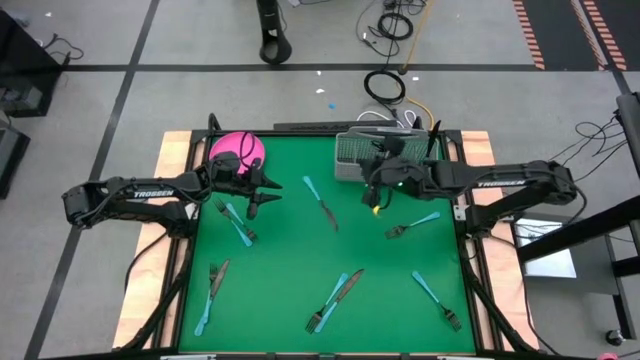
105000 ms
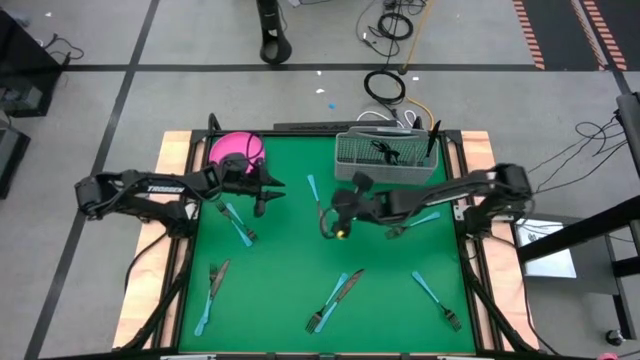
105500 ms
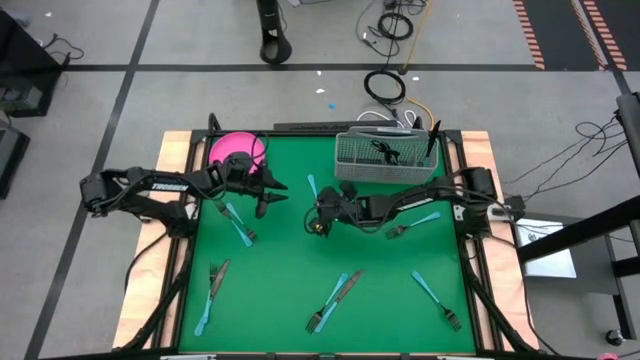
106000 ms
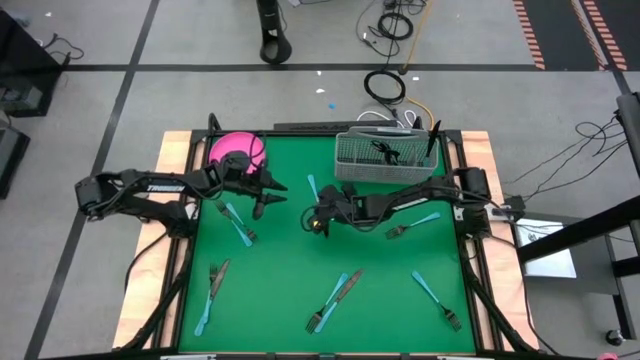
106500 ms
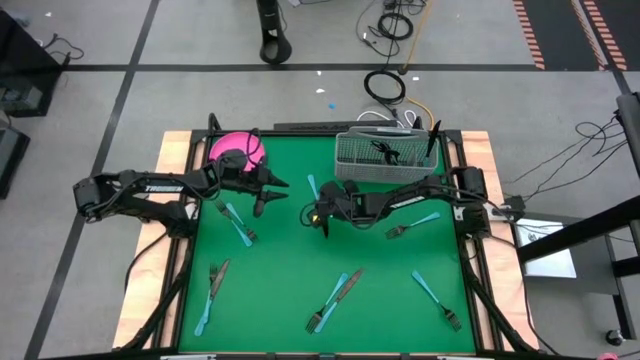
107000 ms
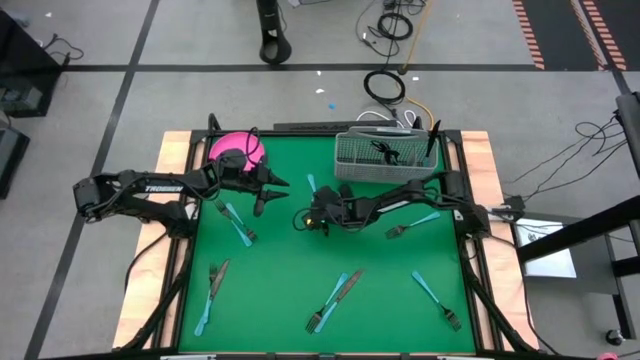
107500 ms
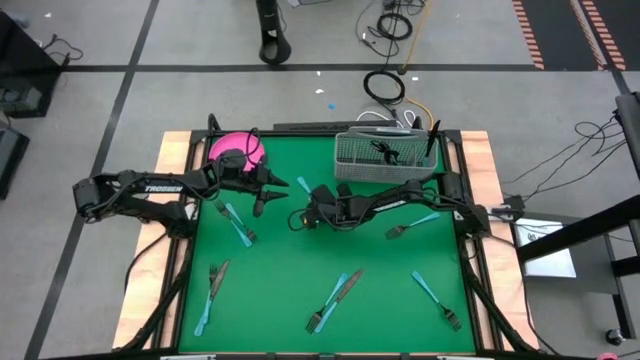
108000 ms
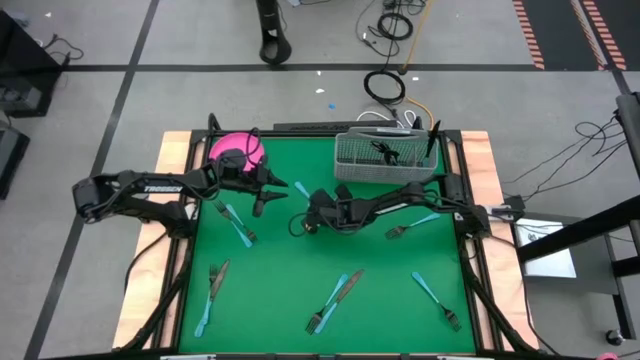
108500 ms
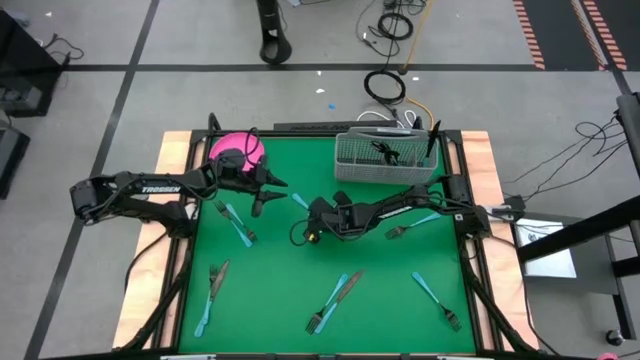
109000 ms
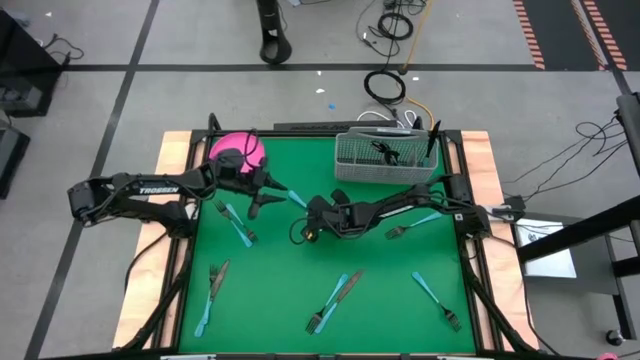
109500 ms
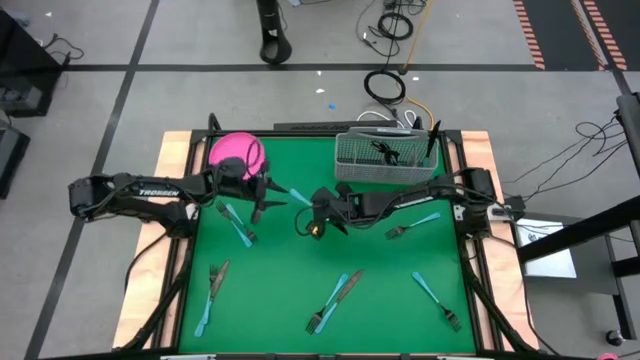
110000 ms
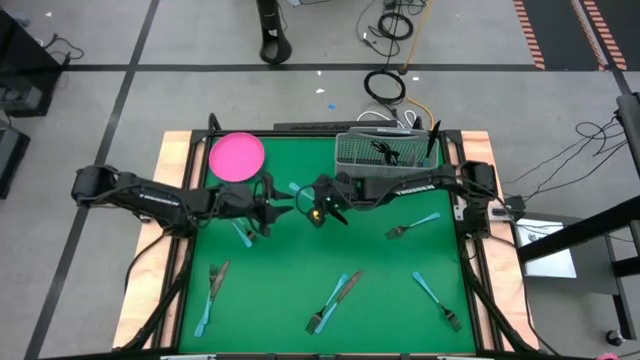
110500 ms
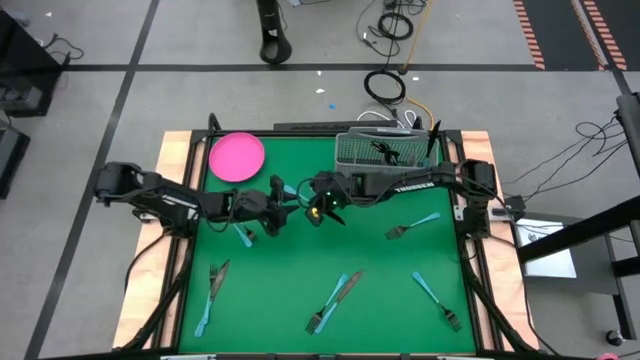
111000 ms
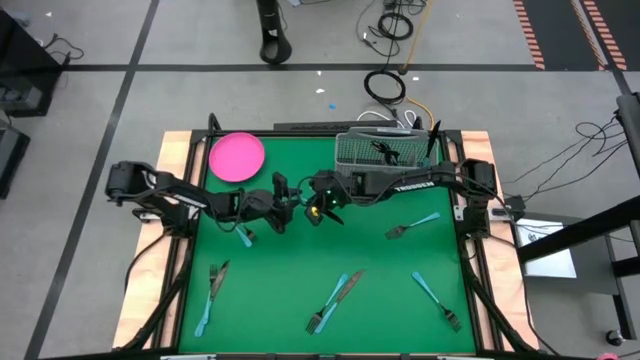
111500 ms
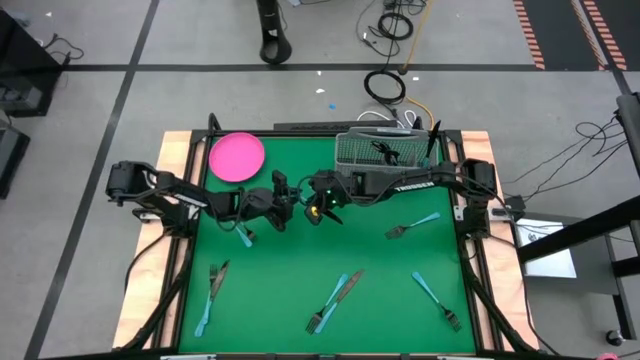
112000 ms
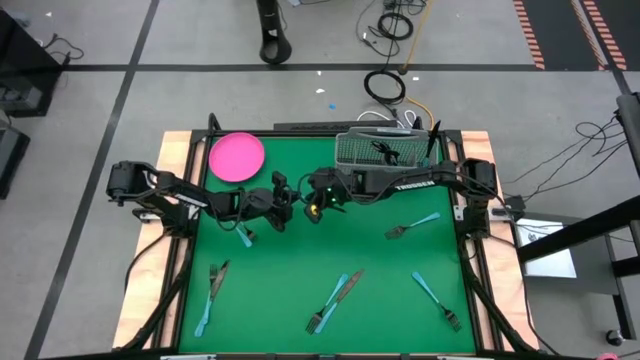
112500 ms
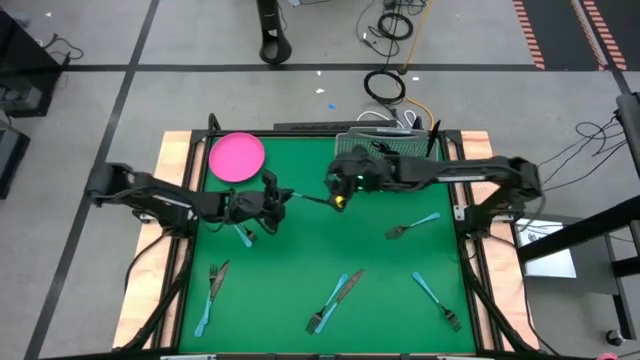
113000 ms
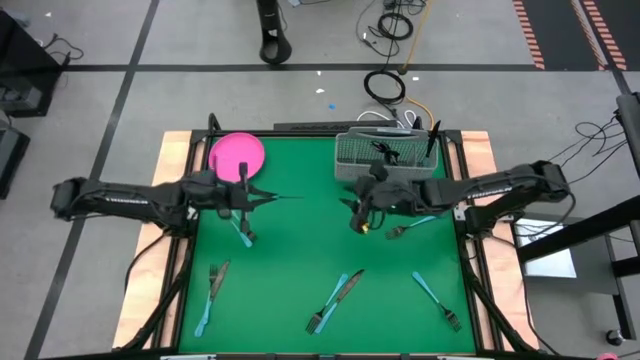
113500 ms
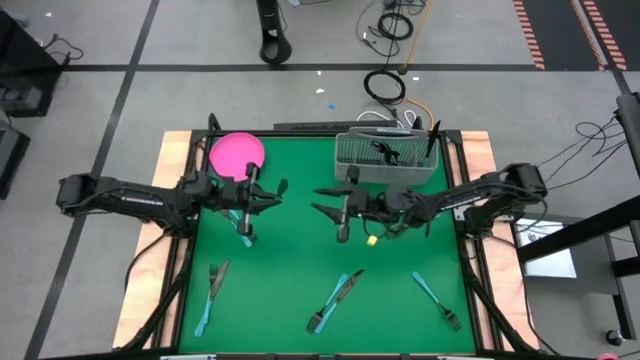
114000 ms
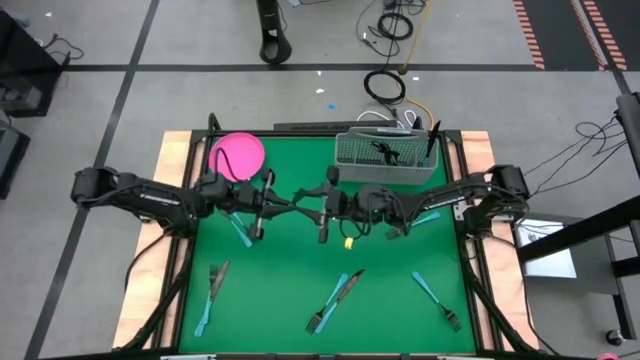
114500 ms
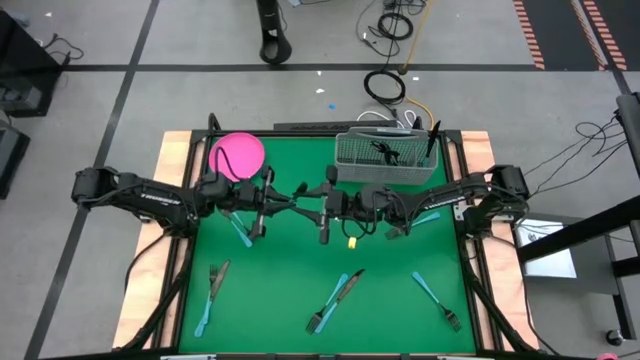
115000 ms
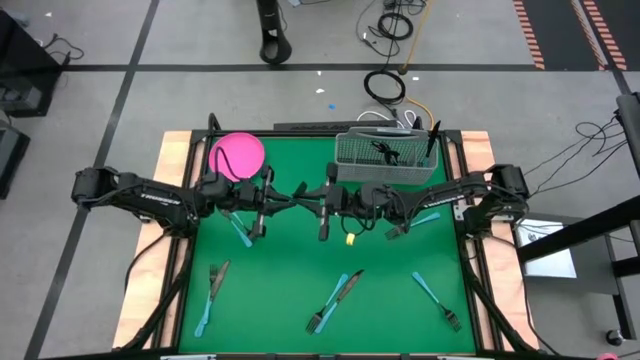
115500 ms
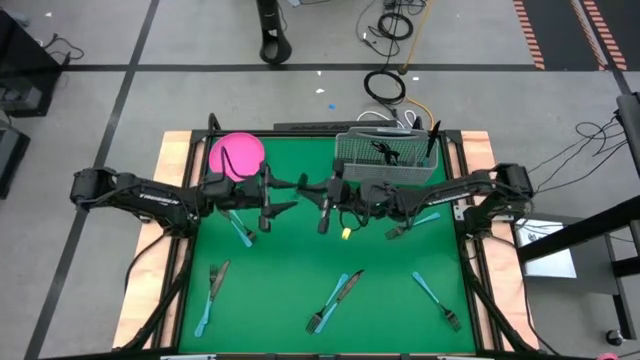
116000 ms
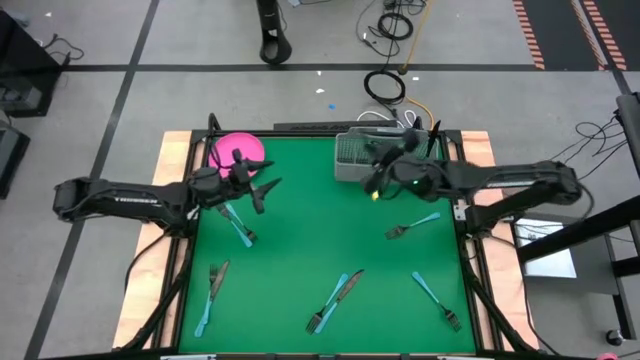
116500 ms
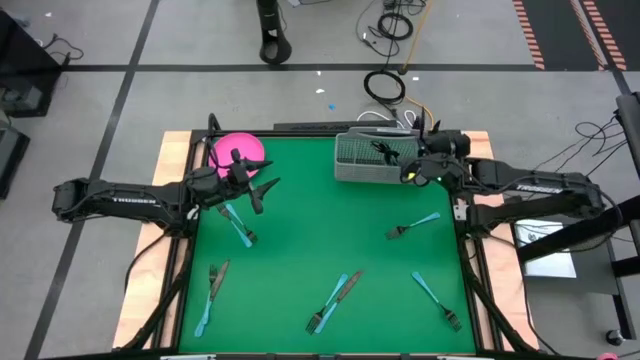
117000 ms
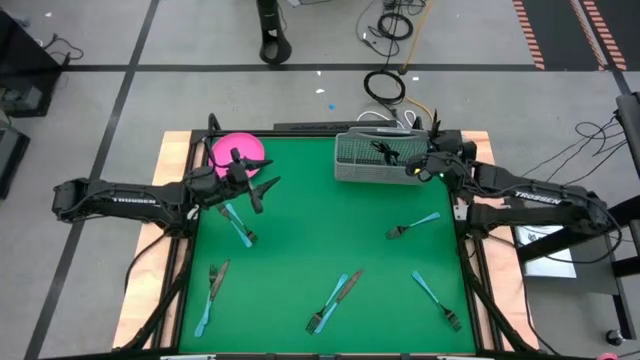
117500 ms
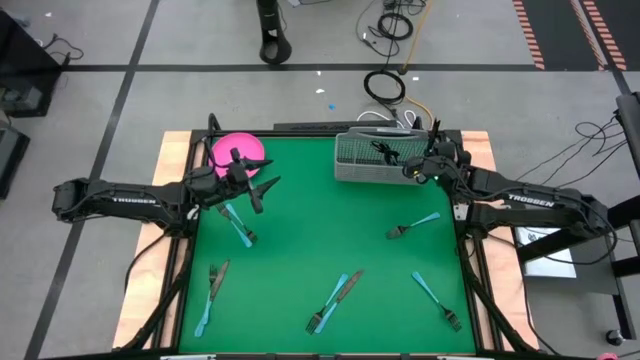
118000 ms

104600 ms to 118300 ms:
Task: Sort silverware
Put the top black knife into the cutlery rack with the other black knives

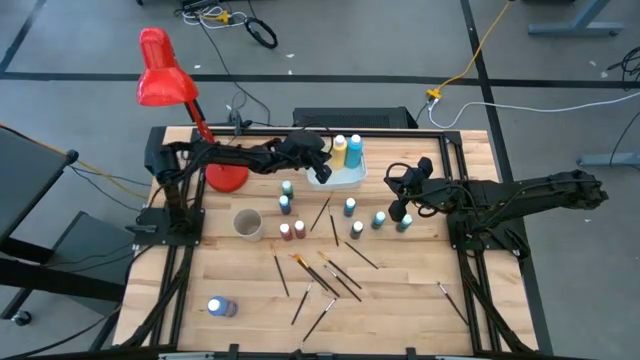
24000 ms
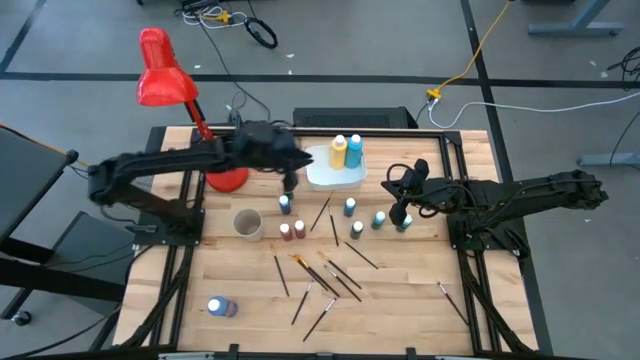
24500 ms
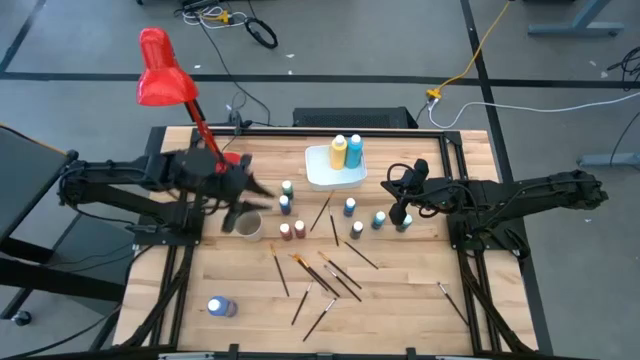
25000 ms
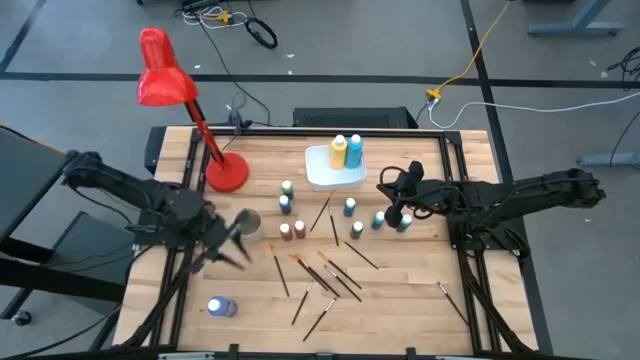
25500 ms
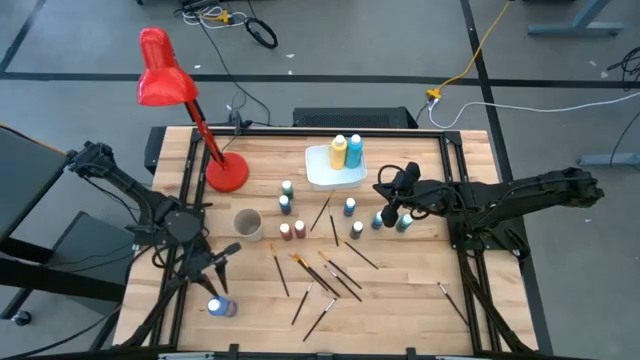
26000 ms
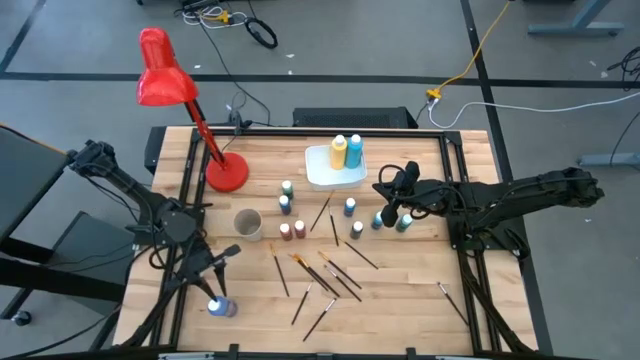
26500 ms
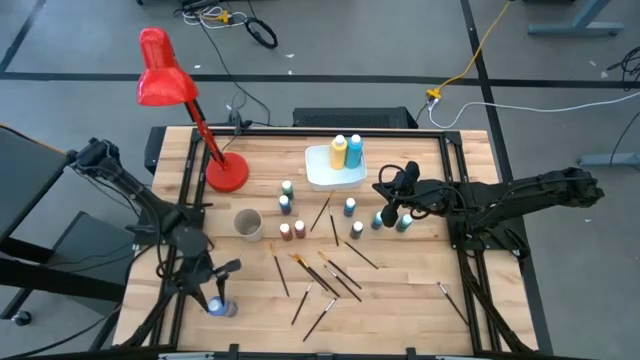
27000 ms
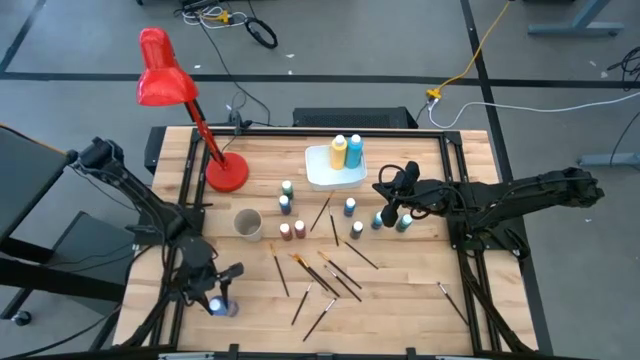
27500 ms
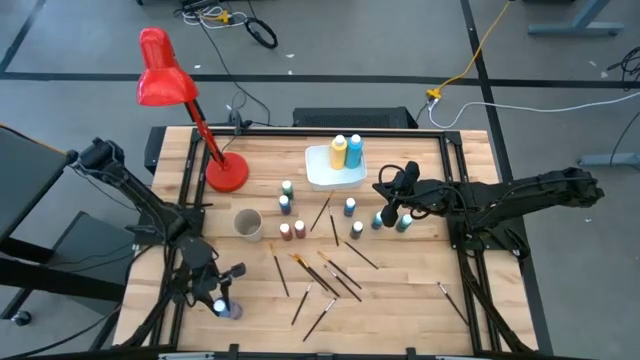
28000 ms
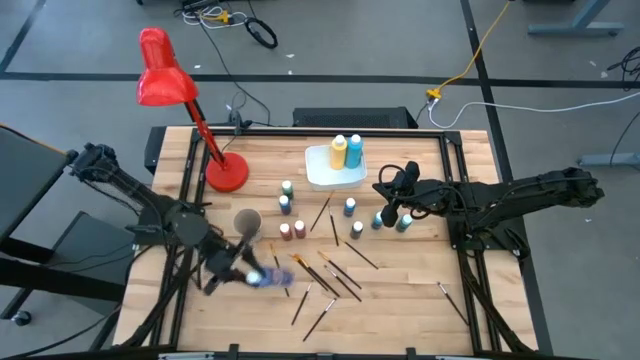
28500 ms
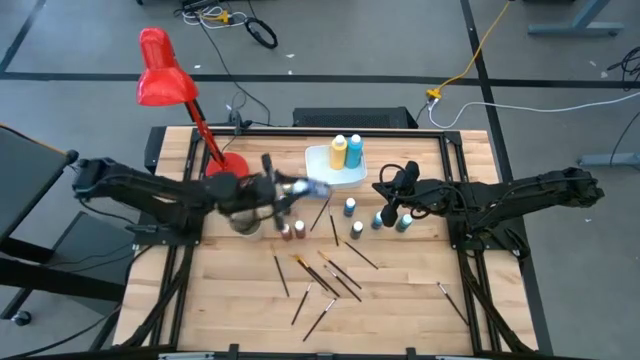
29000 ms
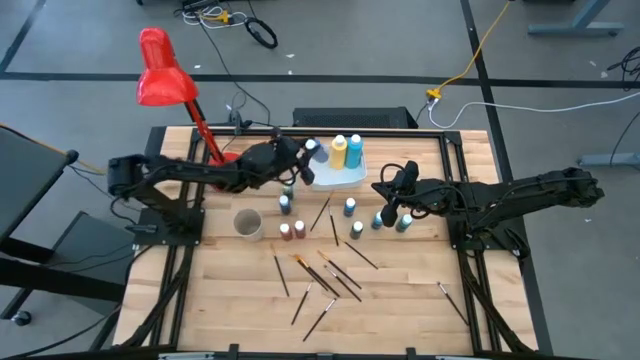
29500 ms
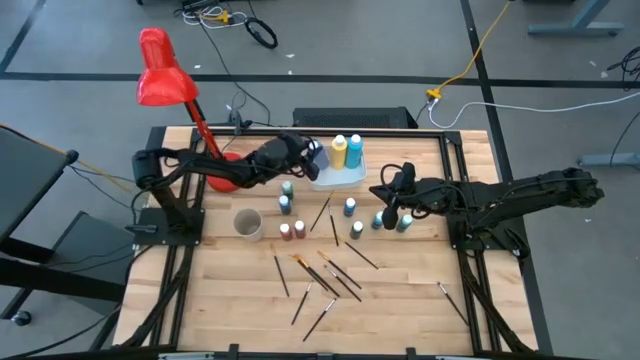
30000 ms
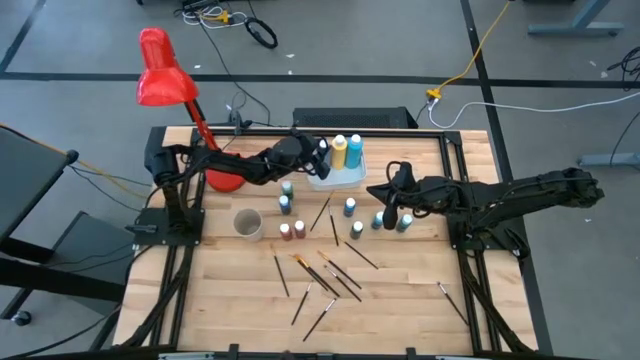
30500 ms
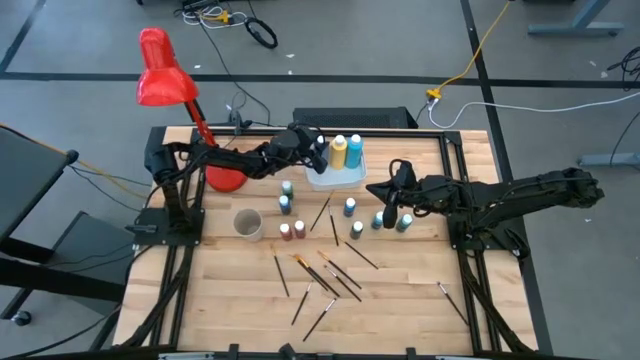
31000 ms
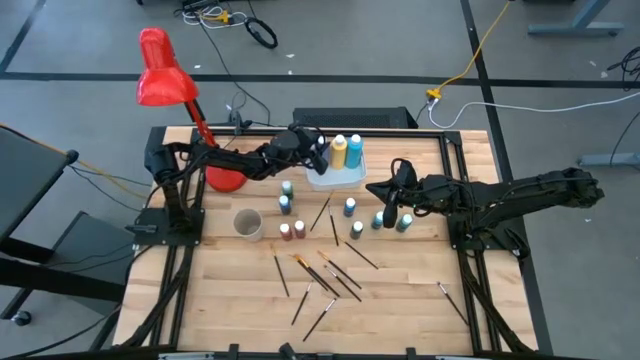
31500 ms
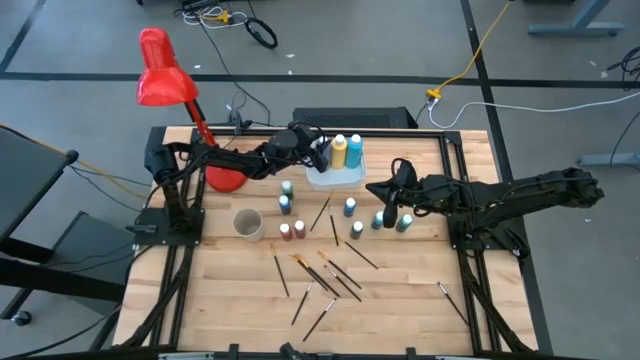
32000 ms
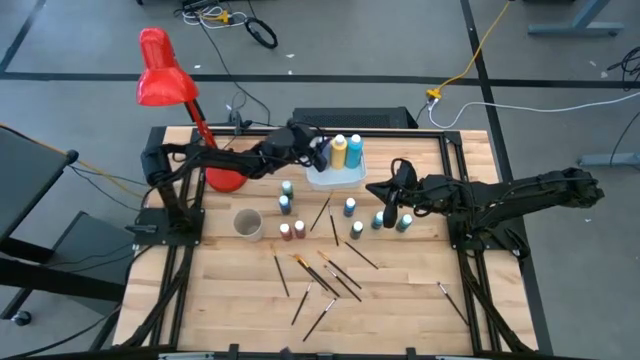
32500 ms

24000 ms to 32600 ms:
Task: Pick & Place Paint Supplies
Put the large blue paint bottle into the white bin
